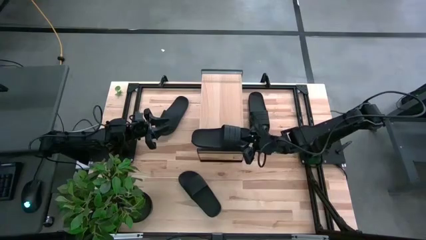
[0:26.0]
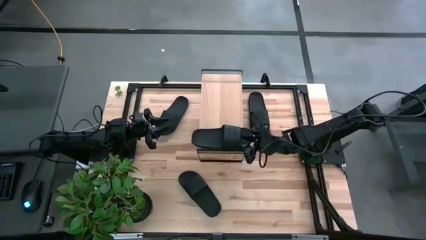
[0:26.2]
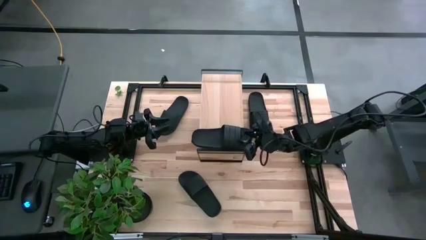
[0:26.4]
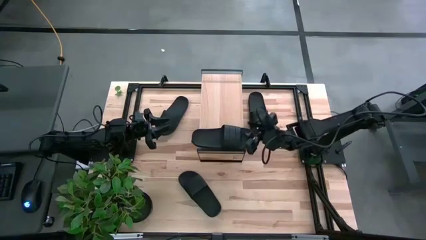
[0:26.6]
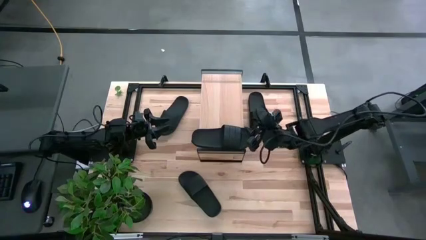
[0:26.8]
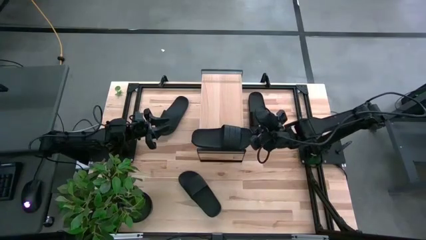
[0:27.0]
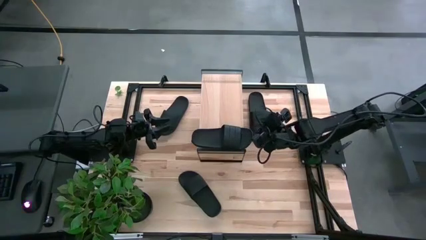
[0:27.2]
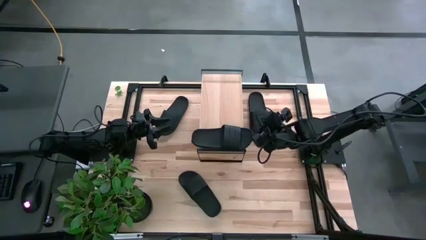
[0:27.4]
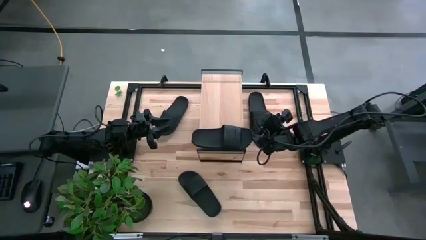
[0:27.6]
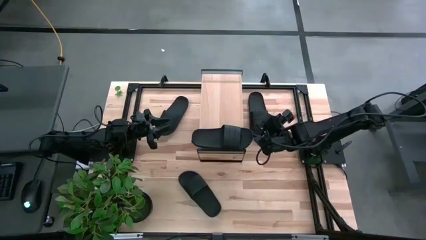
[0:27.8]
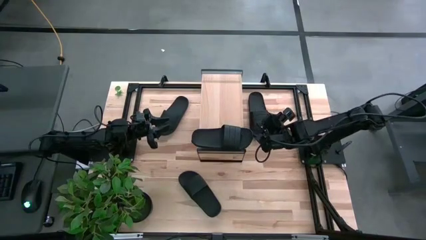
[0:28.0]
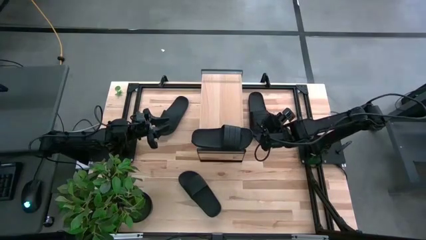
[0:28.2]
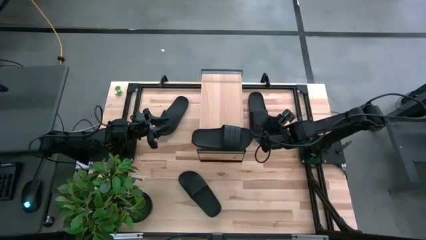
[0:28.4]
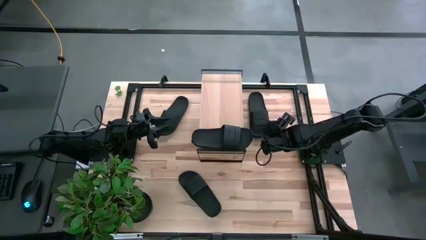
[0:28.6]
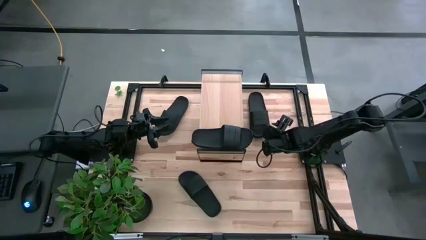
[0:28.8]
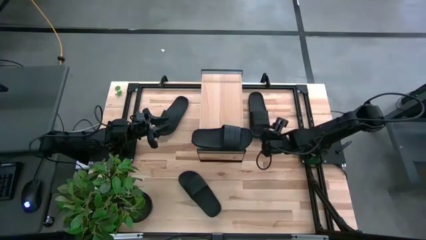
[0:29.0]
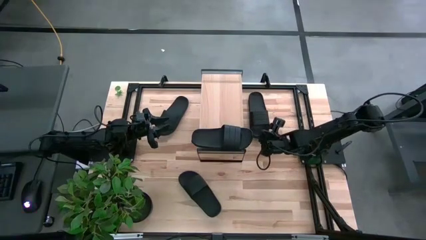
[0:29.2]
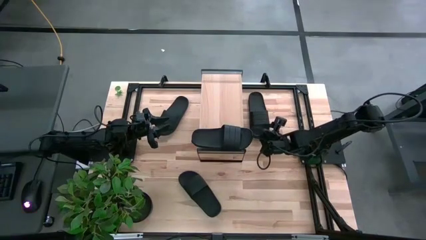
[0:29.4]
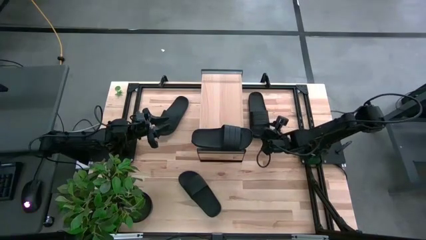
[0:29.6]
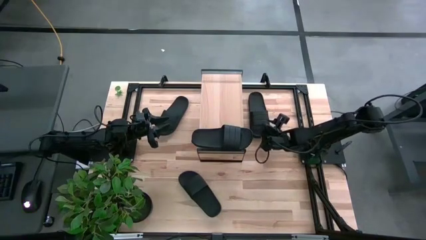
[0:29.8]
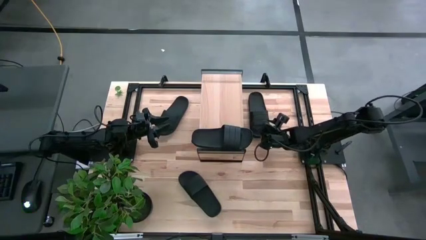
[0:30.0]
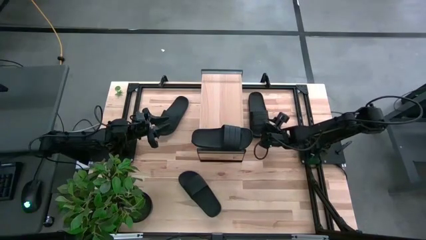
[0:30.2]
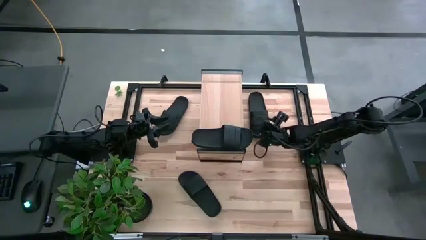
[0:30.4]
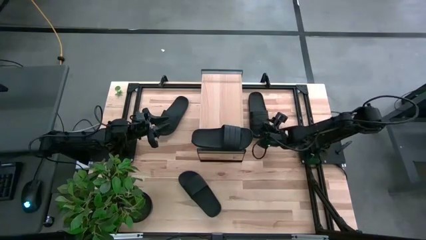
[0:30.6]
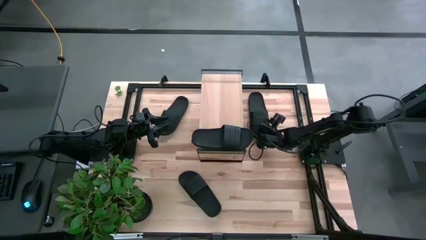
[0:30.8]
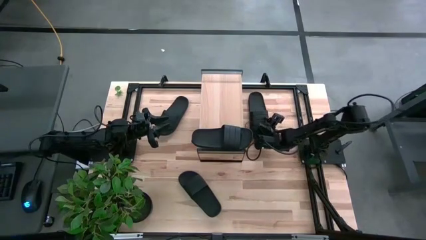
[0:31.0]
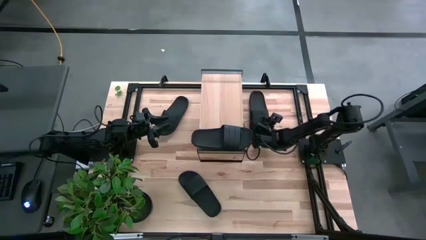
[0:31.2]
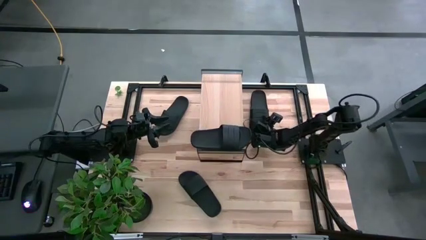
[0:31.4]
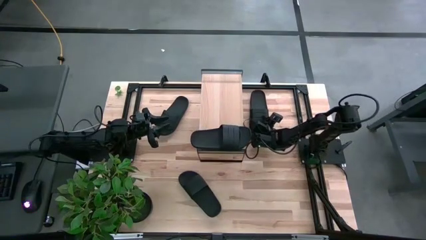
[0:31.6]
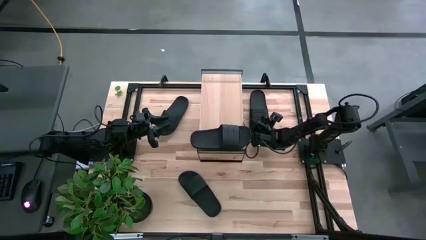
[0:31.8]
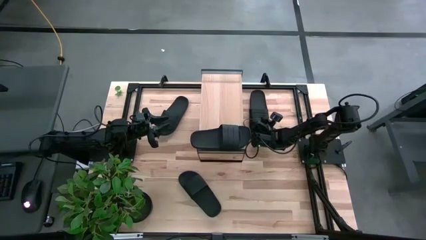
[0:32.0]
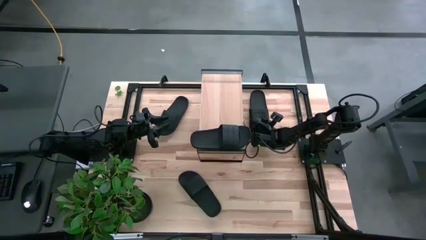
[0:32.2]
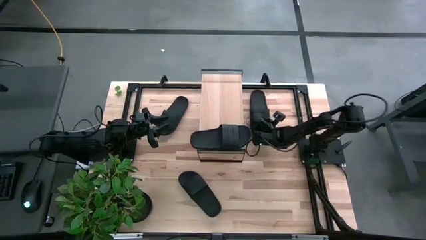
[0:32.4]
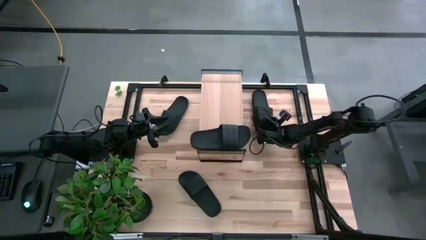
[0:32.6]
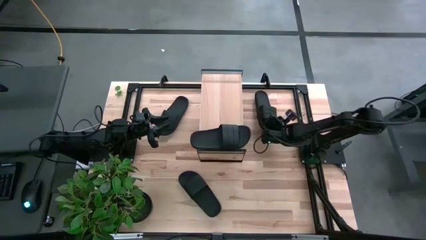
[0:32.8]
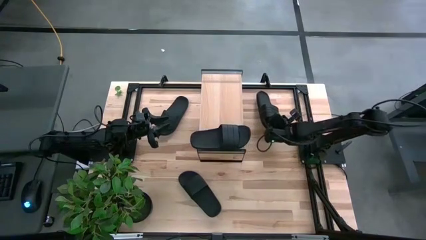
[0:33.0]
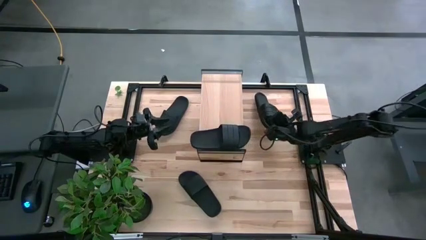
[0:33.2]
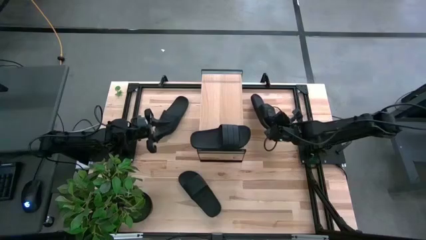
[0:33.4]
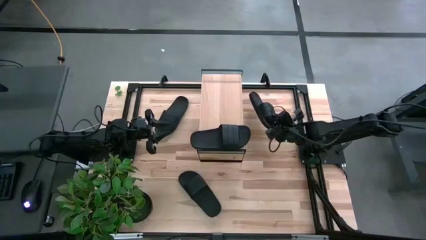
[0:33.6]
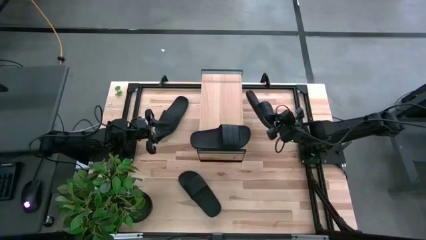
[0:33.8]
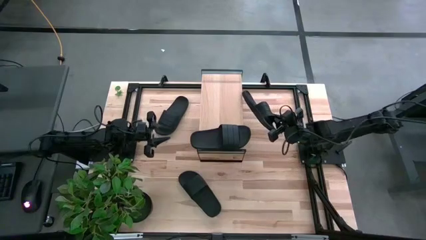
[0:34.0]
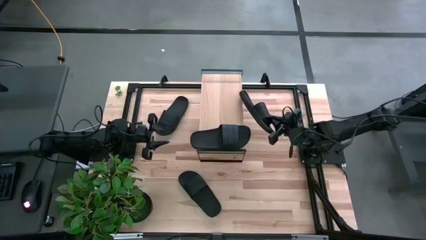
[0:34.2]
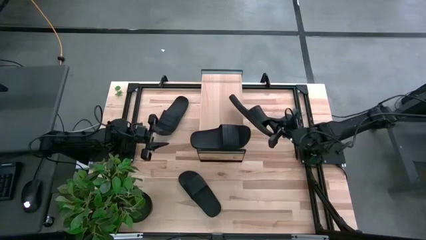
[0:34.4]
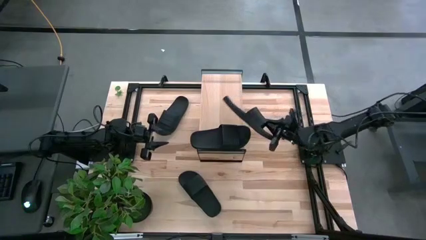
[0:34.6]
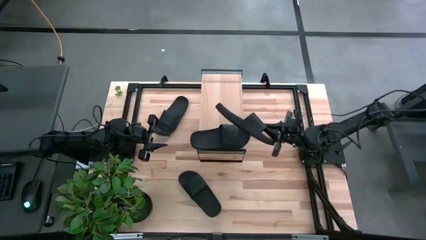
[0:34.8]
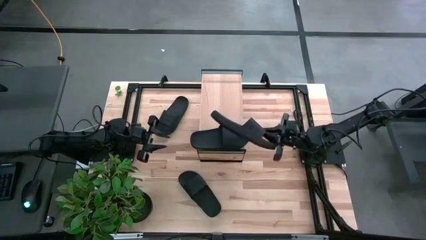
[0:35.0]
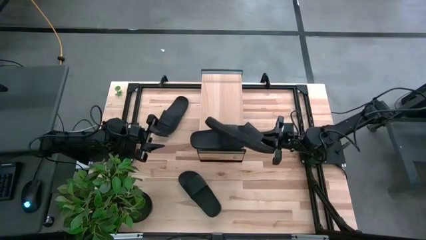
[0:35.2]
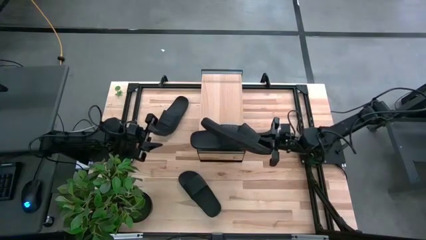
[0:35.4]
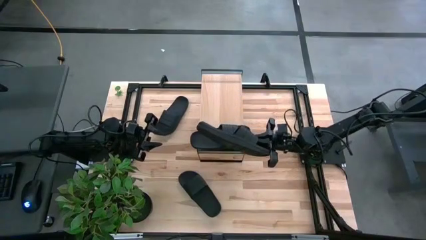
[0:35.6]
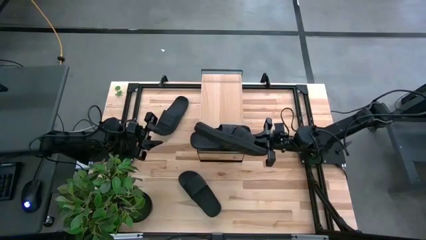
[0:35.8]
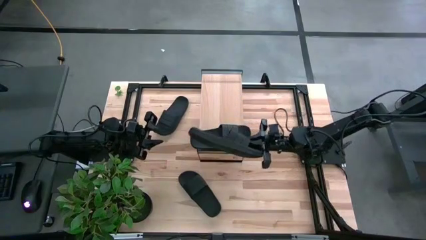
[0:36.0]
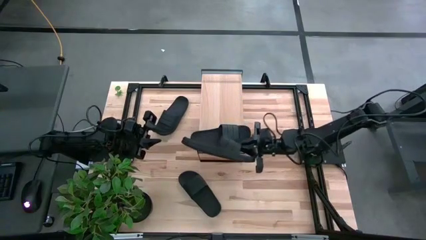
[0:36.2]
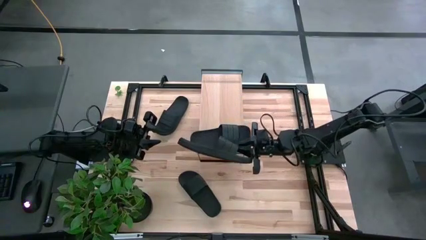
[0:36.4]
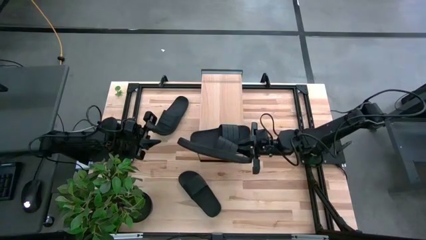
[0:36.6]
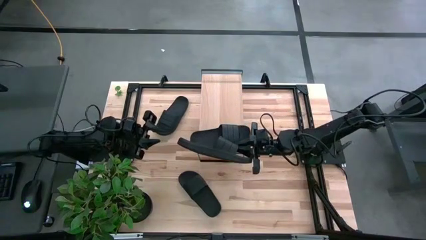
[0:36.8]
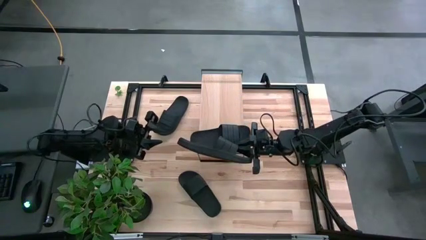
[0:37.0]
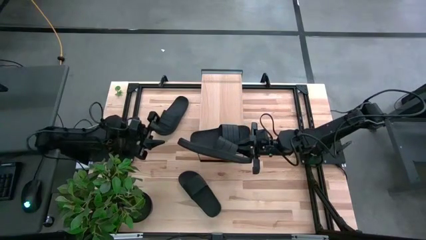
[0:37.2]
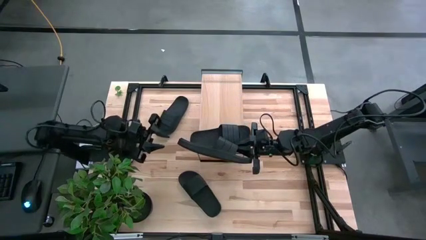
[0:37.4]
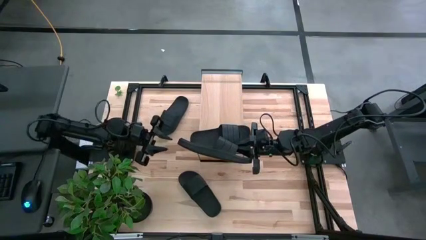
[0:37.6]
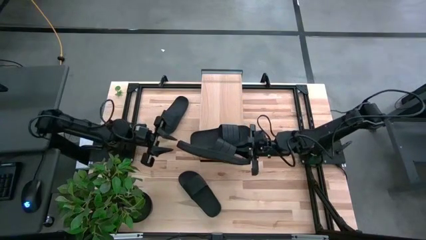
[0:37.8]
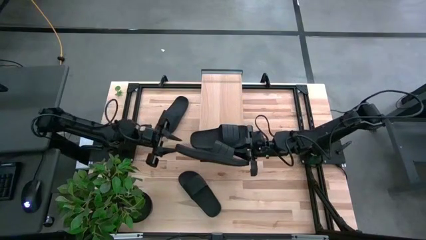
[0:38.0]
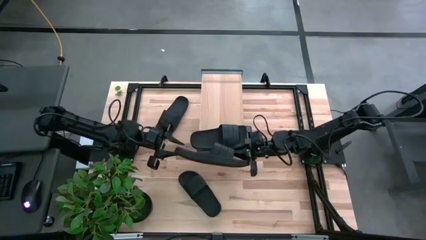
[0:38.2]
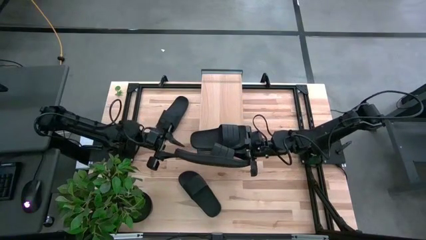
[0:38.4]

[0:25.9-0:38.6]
Task: Pick and place slides into the shelf
Put the black slipper on the shelf
